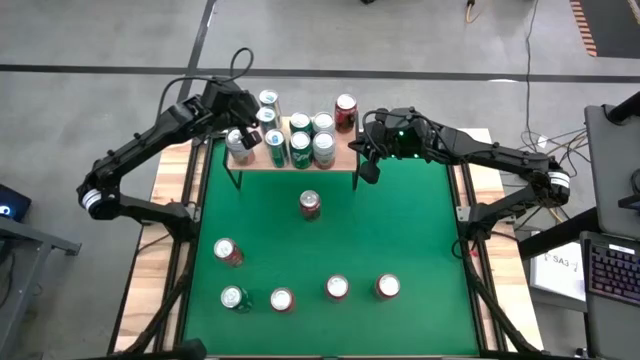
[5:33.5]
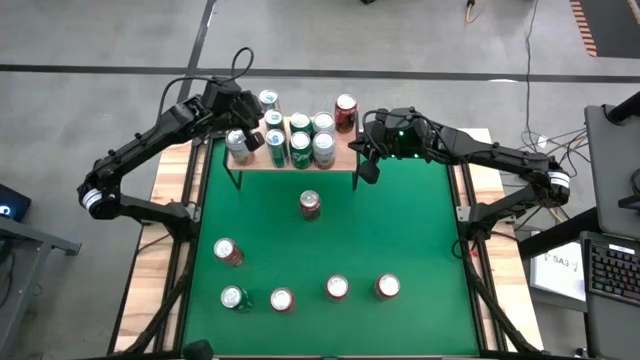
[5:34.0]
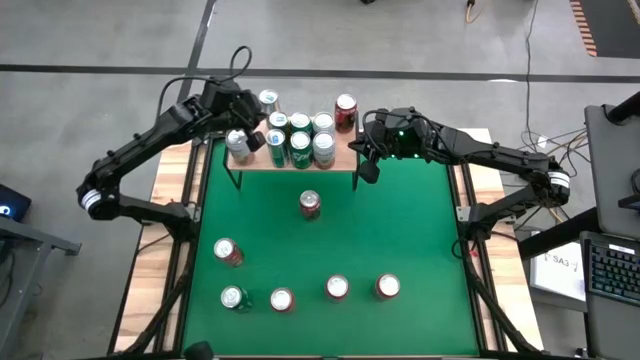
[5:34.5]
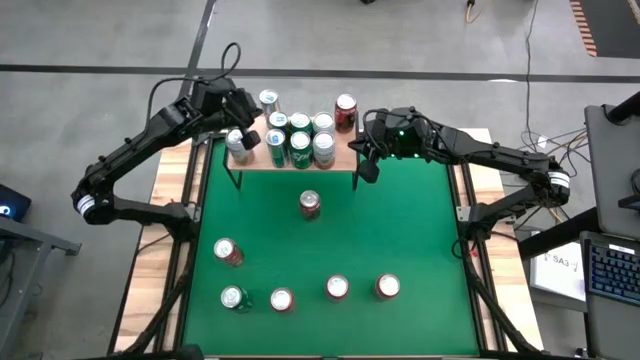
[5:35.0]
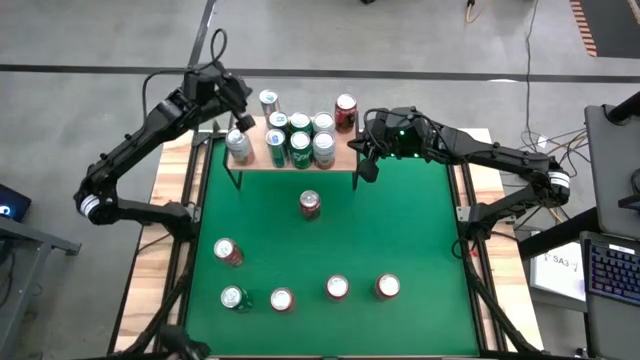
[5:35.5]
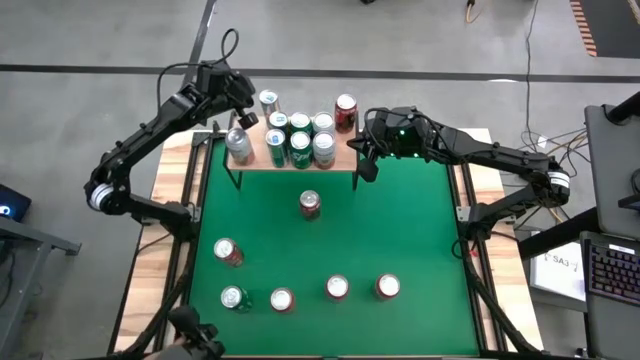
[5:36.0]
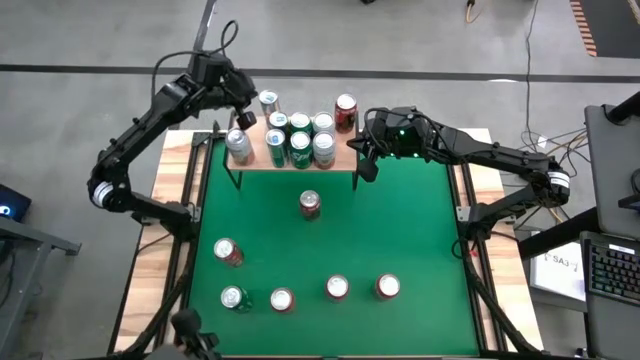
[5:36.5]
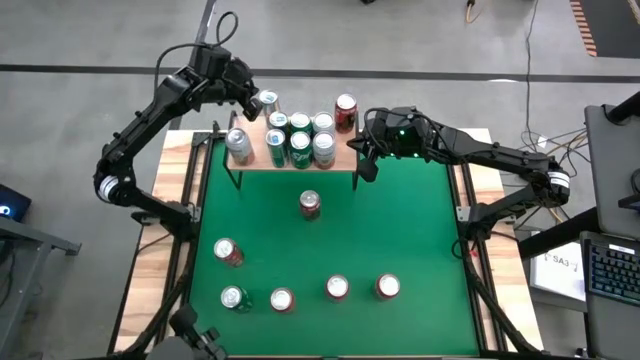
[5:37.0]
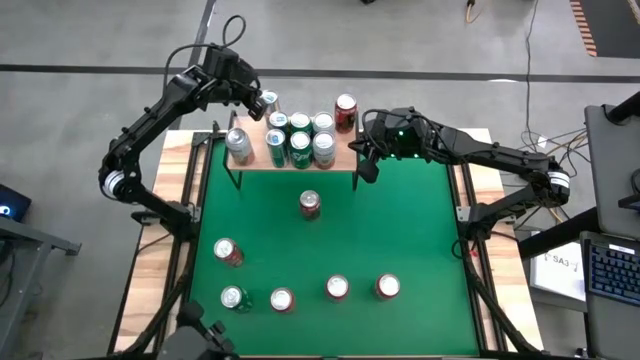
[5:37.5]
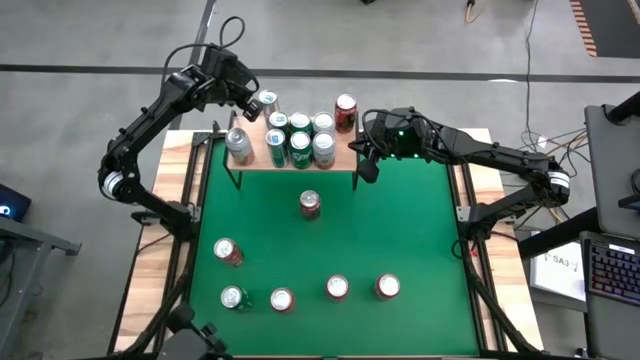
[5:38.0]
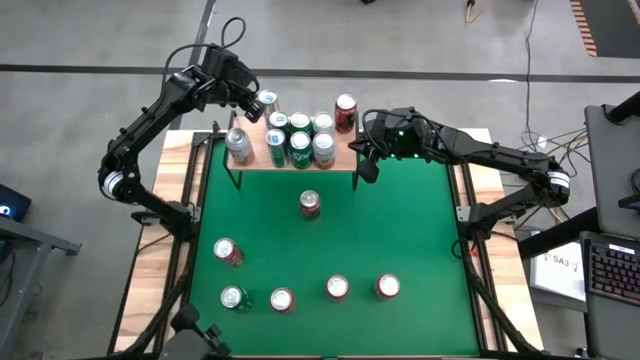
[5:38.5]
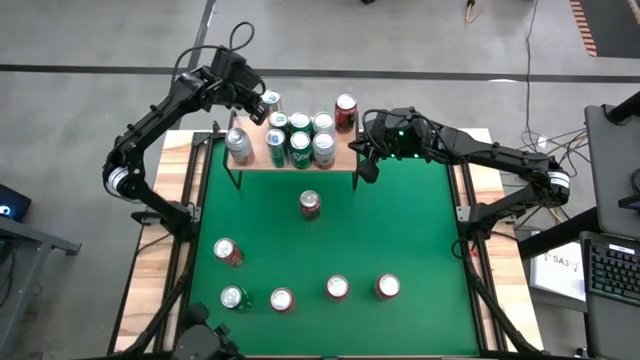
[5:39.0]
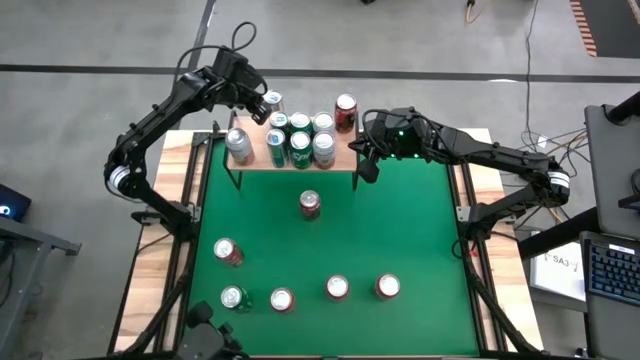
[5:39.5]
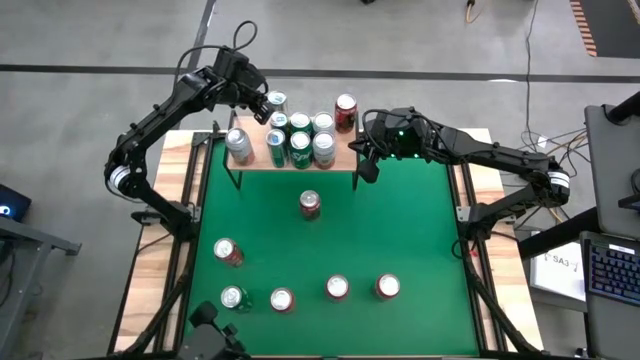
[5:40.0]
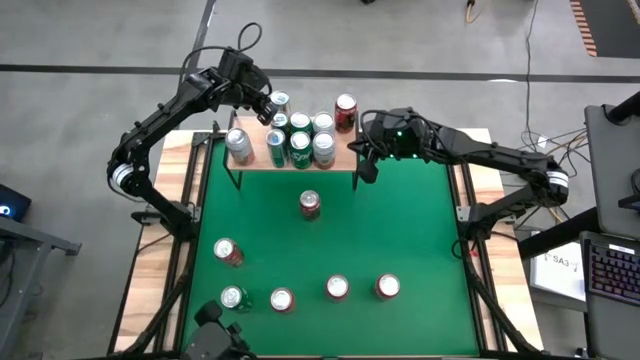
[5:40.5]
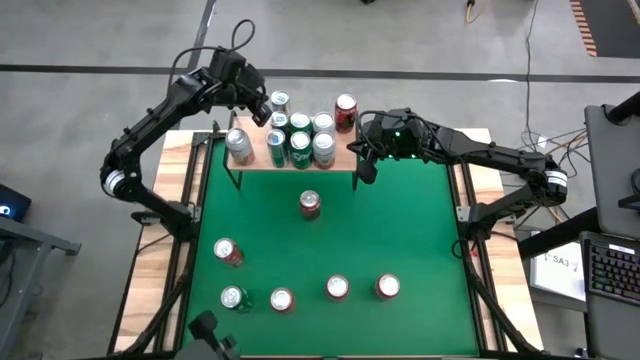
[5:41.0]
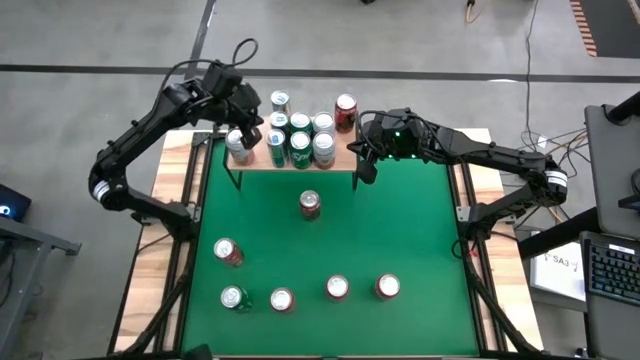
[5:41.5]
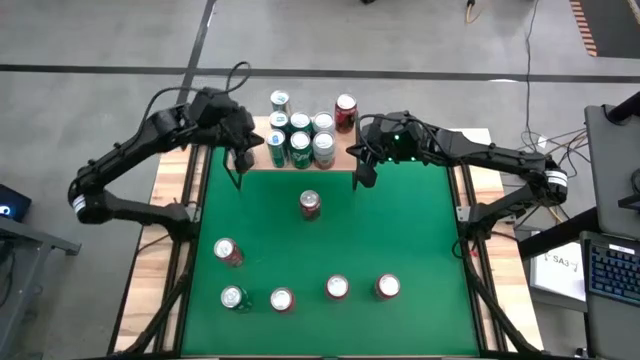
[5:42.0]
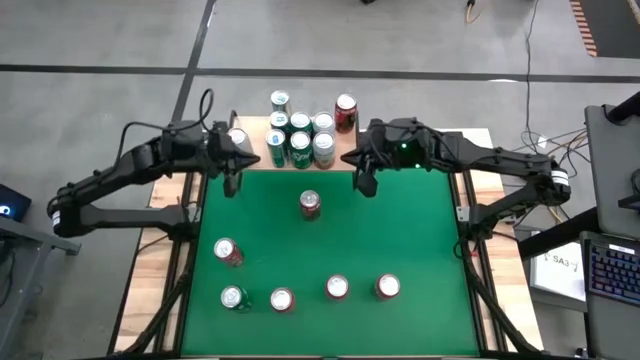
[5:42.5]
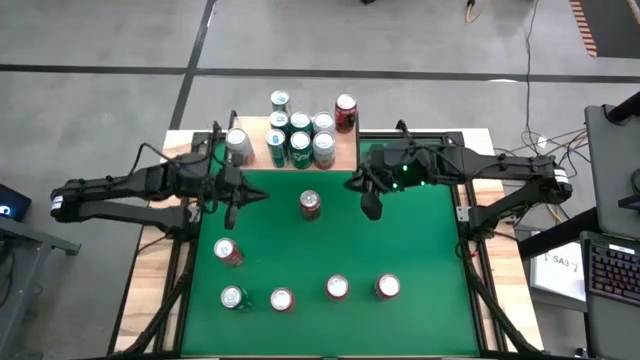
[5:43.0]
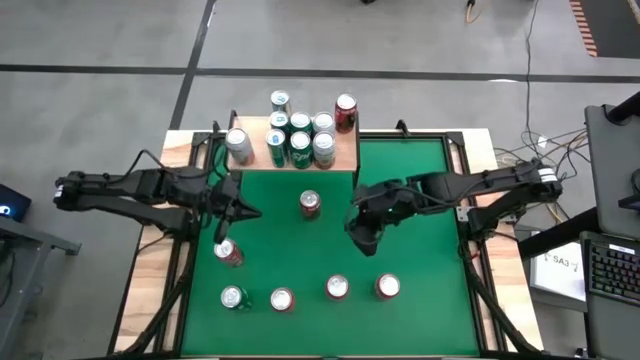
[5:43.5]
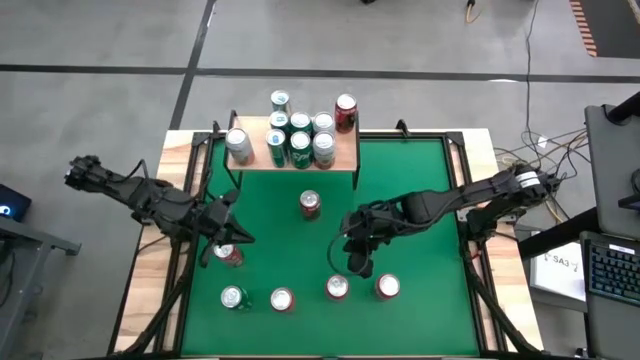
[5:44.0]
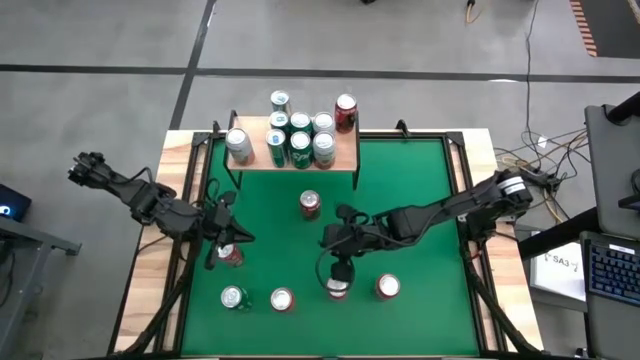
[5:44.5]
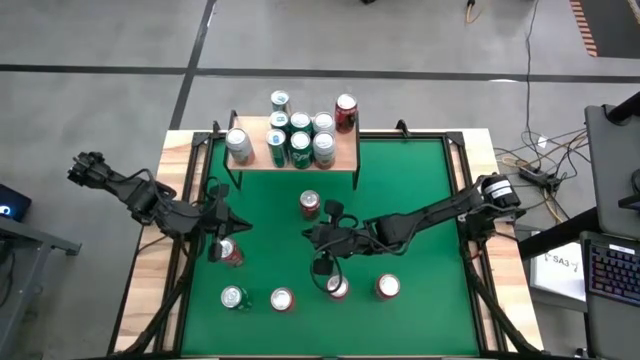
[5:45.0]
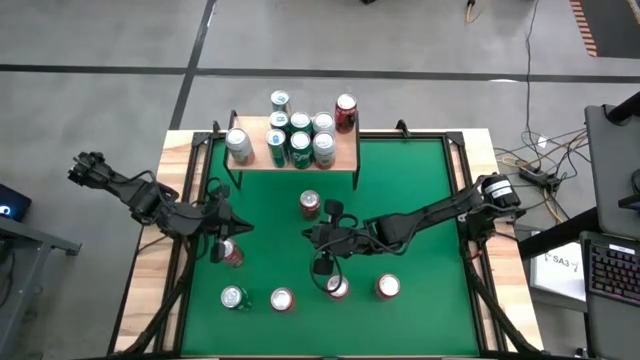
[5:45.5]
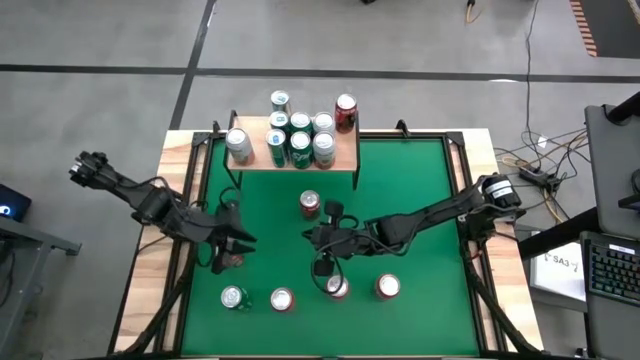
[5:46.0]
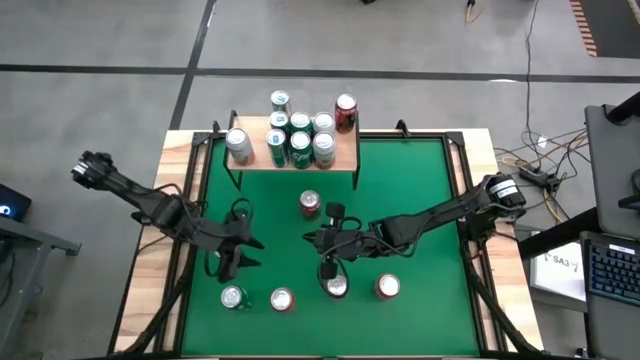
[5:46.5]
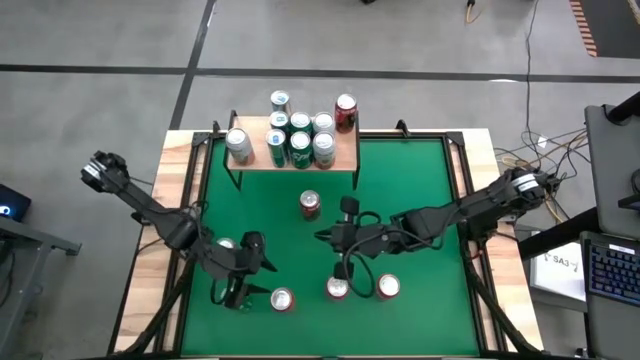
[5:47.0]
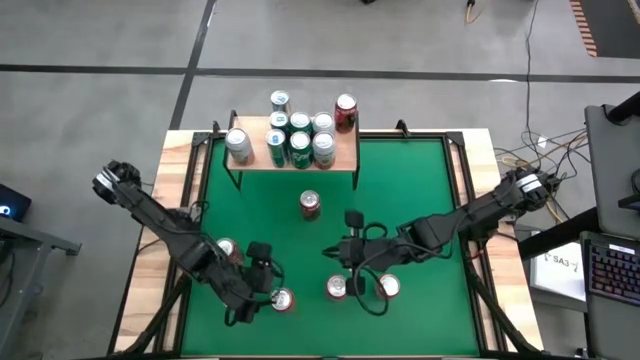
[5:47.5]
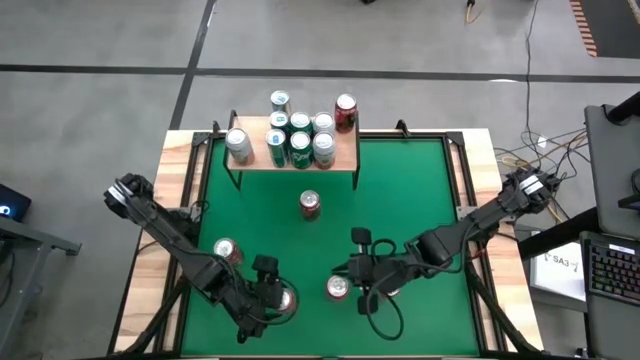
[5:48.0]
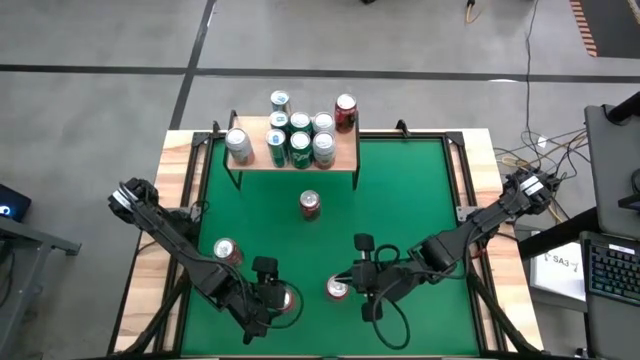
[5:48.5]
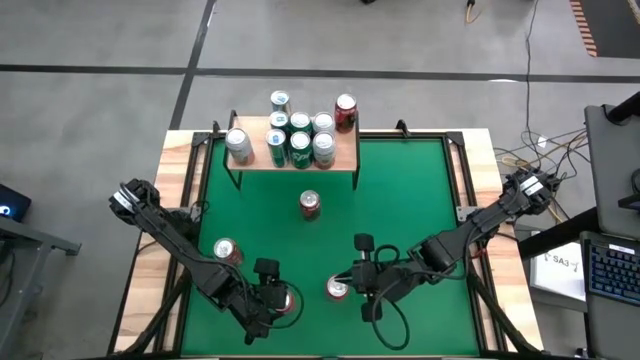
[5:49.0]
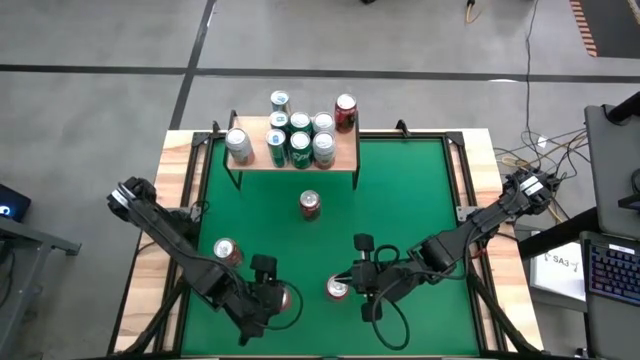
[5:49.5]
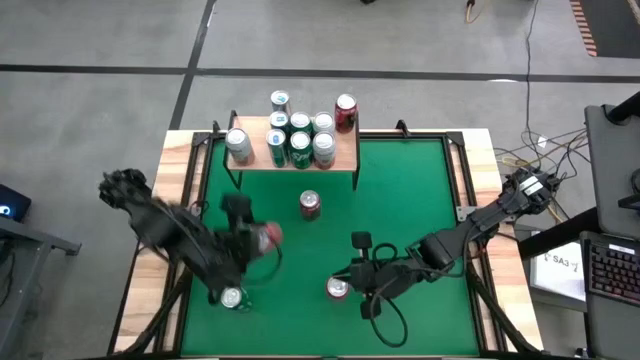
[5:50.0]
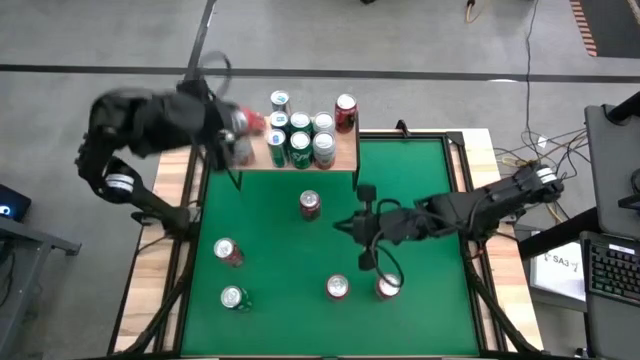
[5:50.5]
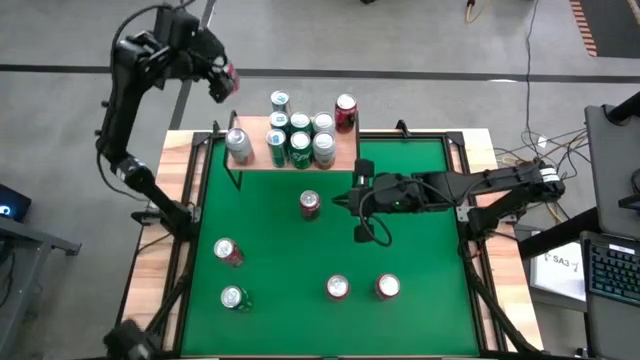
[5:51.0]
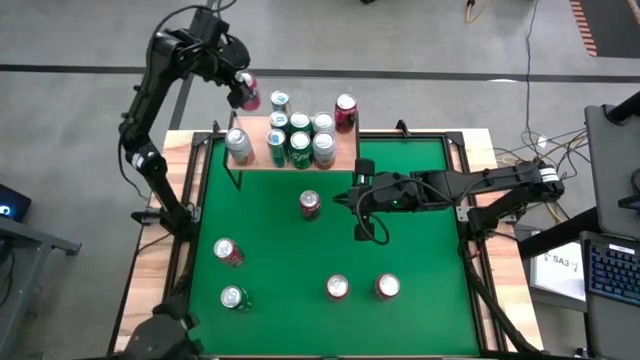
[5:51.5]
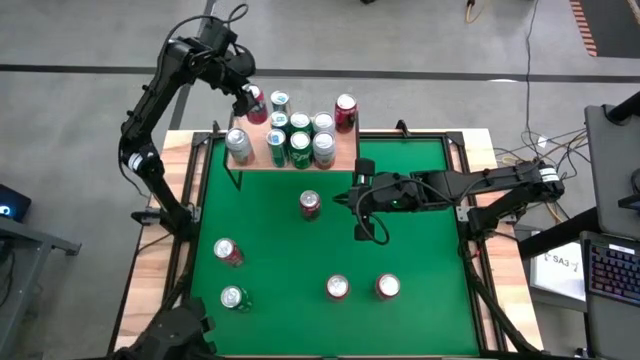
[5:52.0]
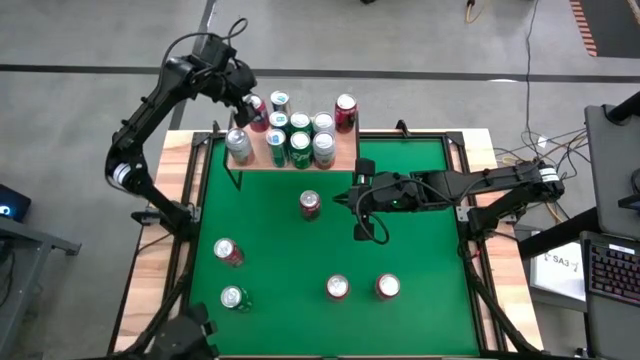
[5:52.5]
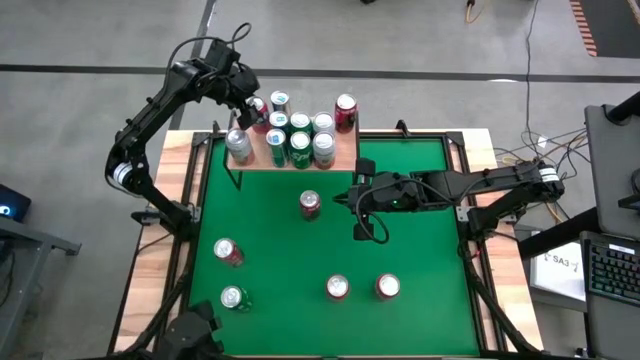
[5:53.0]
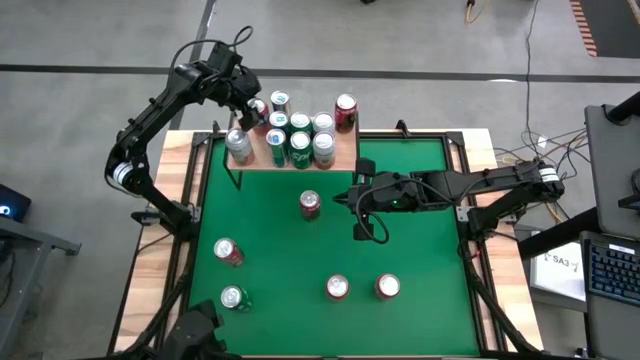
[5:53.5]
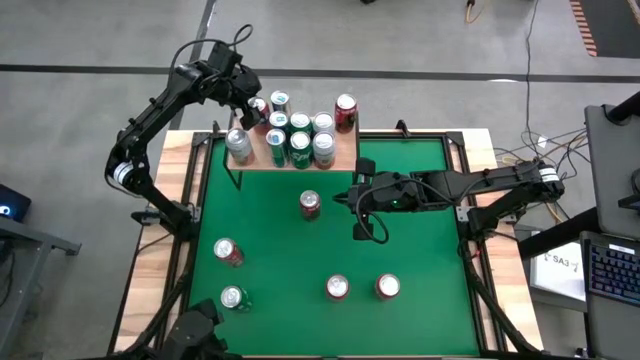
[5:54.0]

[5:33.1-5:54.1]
Task: Place canned beverage on shelf
Put the orange can on the shelf
